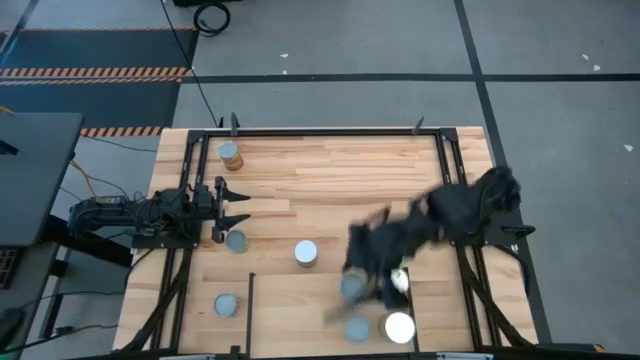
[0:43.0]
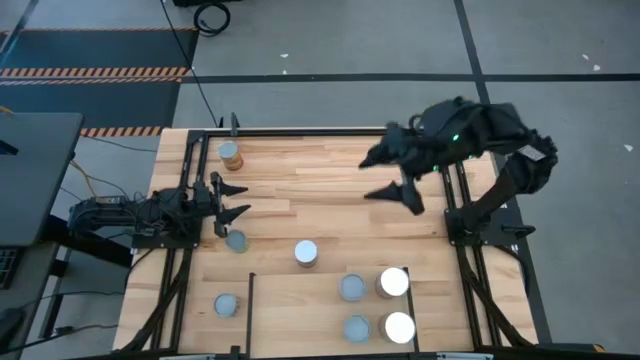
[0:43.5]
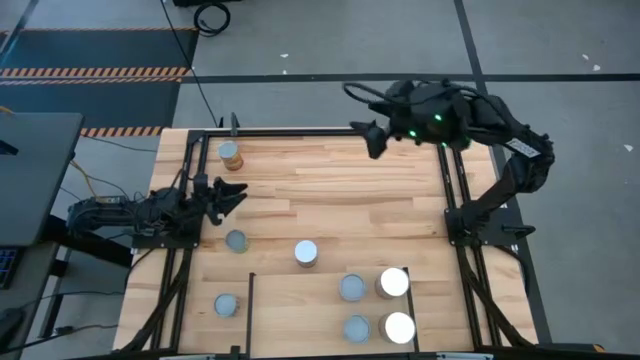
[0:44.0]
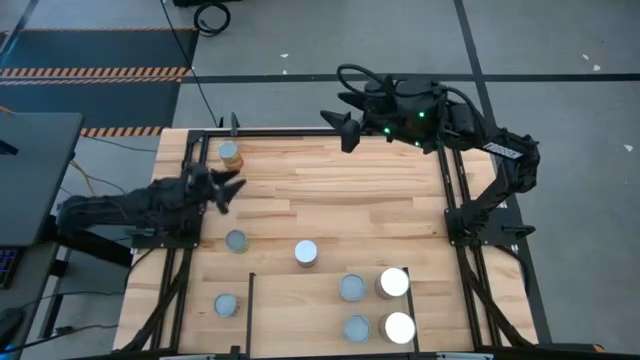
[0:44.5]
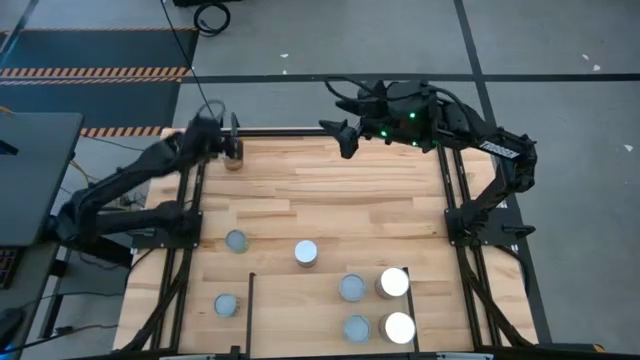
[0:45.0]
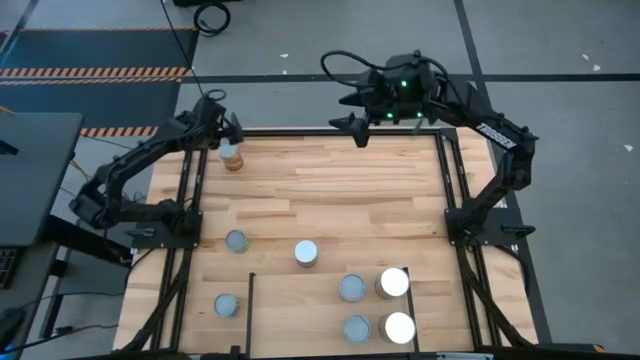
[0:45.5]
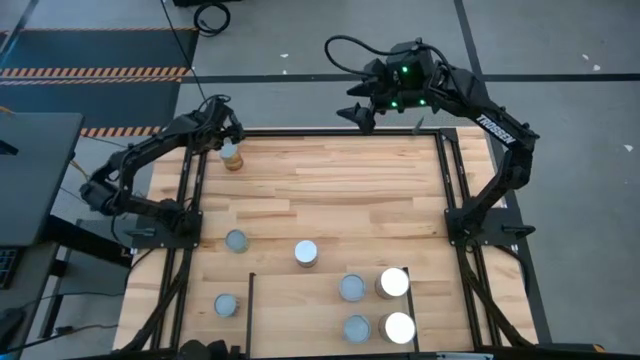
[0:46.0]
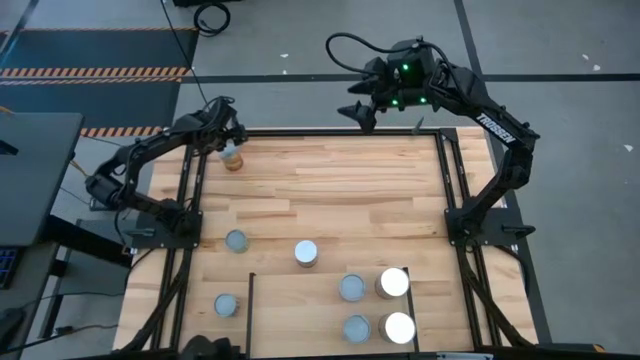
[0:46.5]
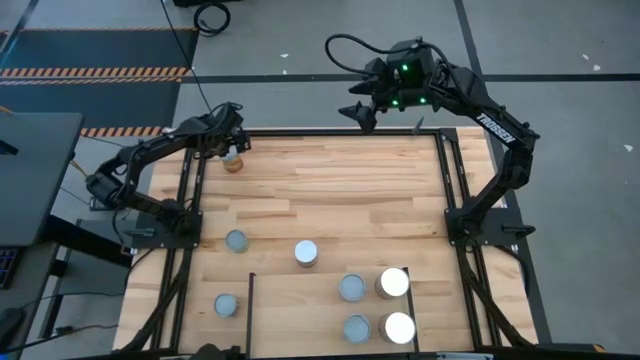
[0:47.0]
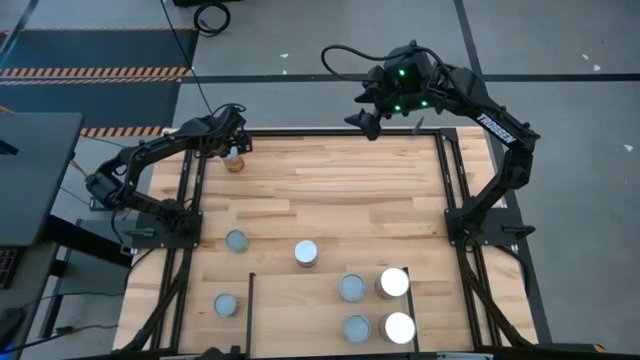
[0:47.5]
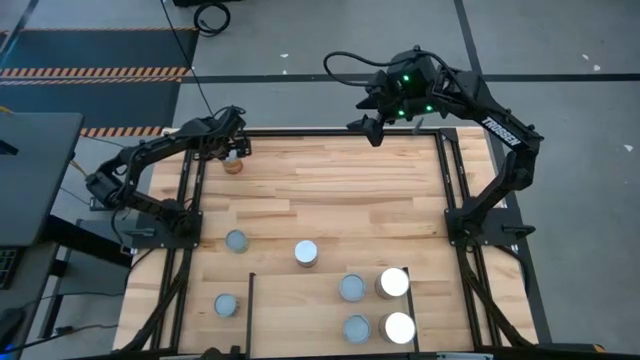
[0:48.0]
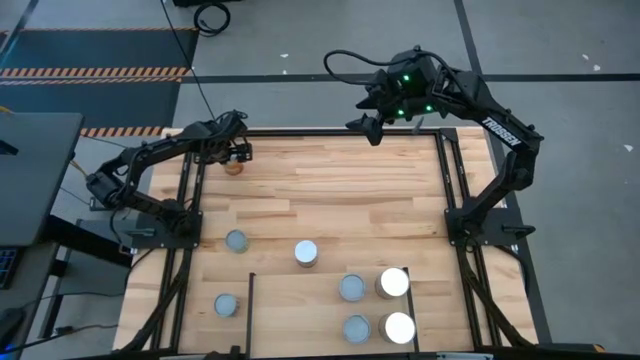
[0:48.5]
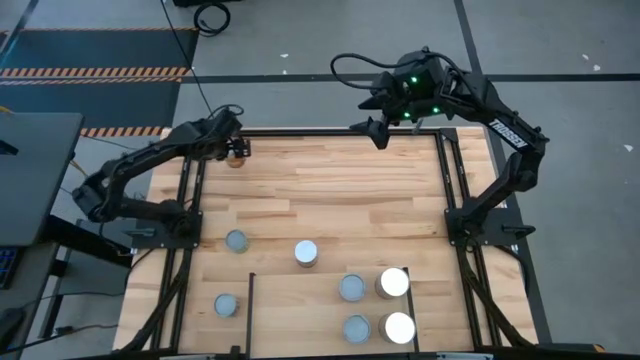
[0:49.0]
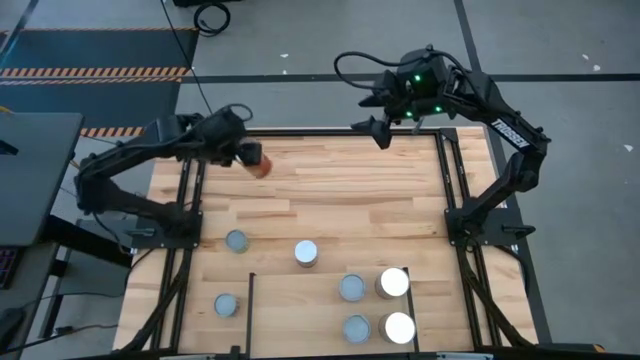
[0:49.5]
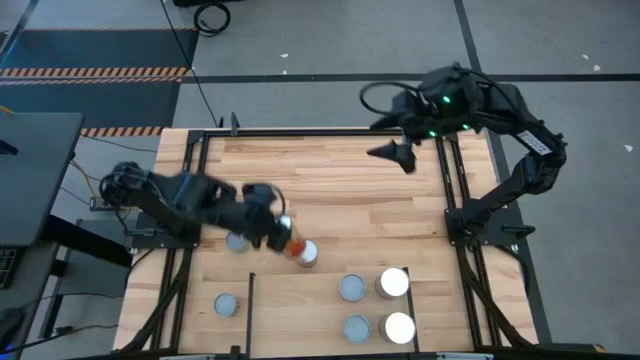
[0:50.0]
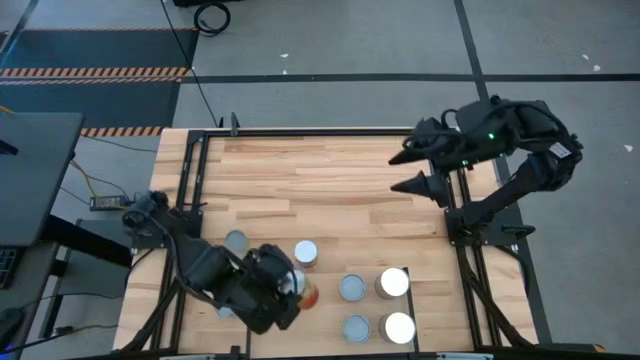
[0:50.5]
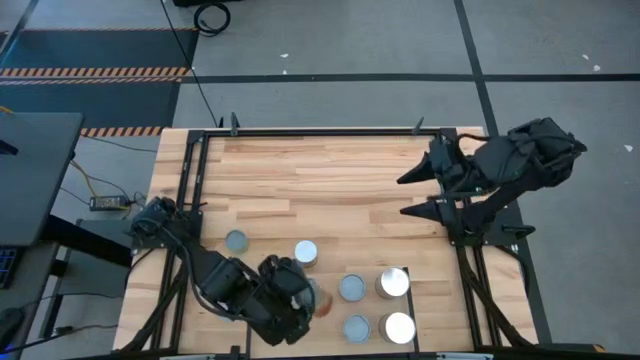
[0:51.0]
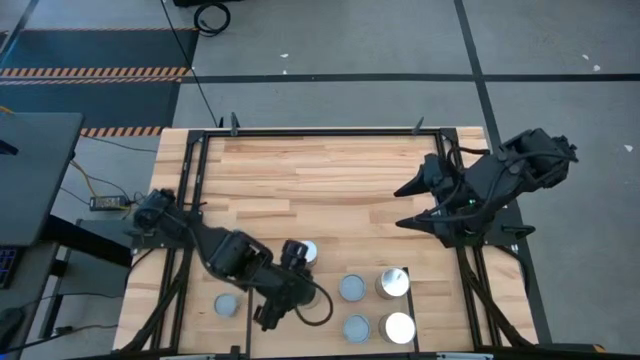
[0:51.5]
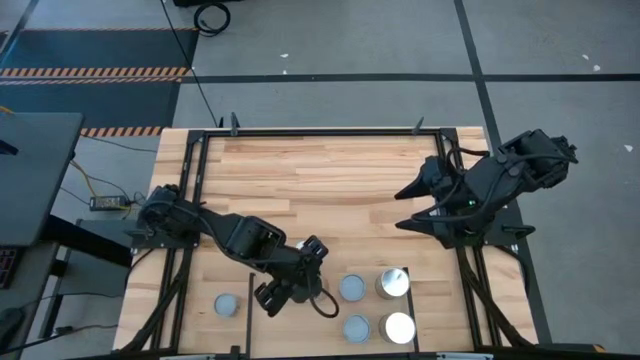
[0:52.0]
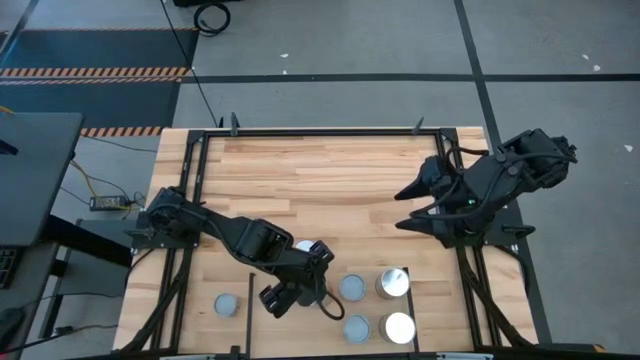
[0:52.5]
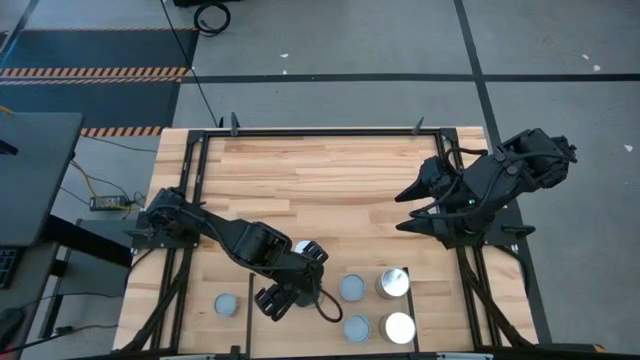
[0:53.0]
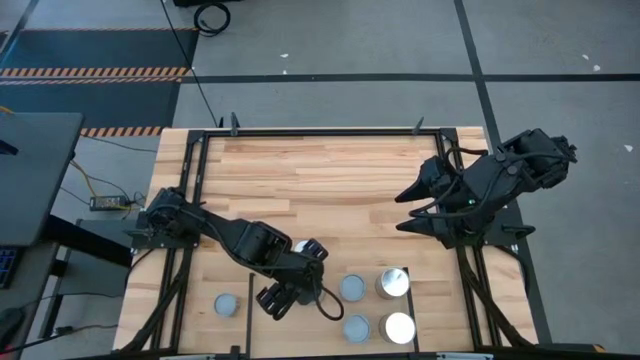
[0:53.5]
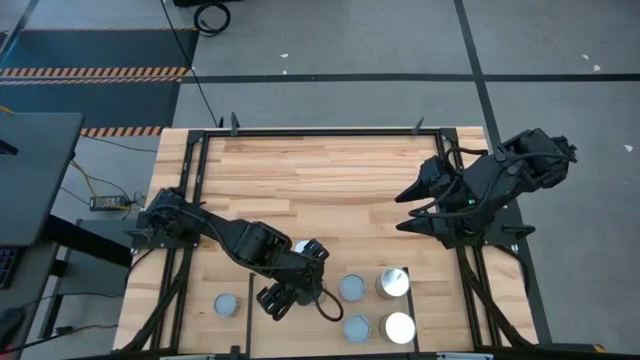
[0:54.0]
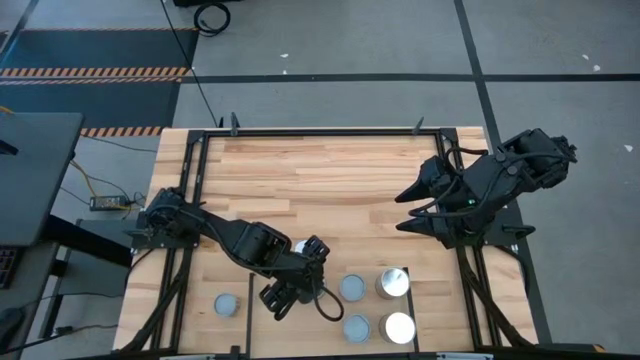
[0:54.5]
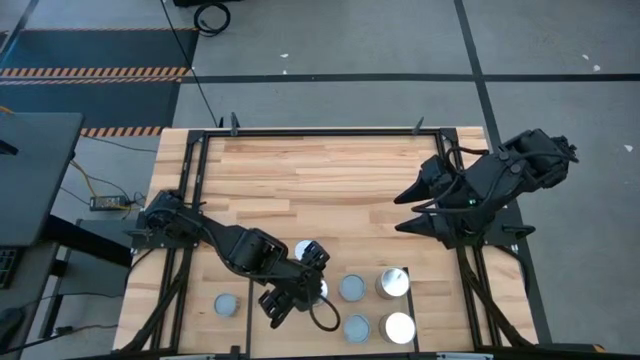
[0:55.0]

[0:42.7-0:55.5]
Task: Pick and place cans onto a shelf
Put the top orange canned corn on the shelf

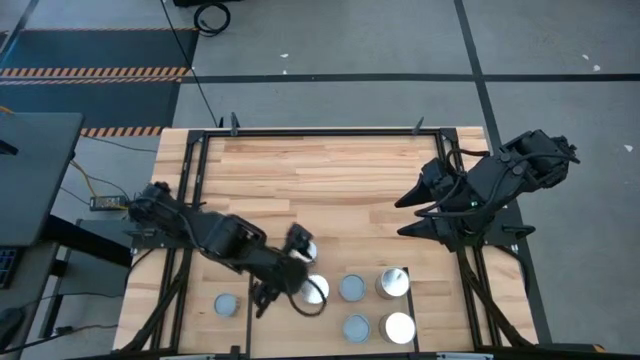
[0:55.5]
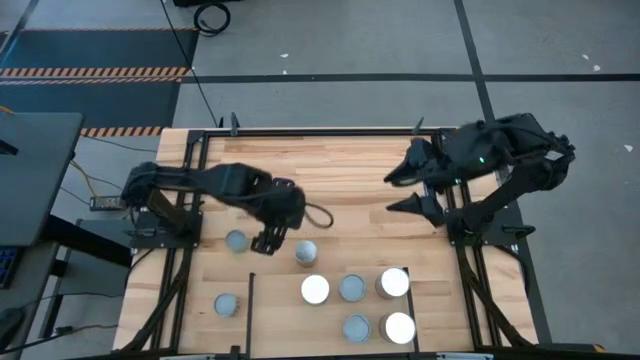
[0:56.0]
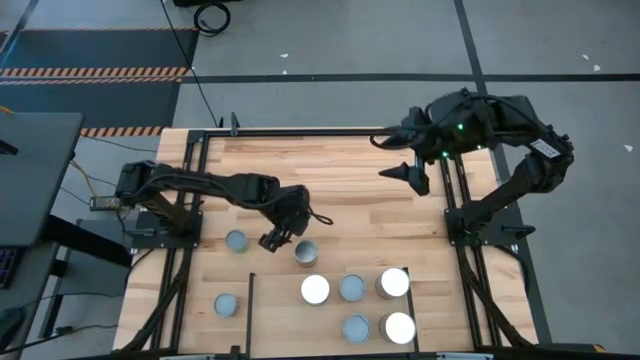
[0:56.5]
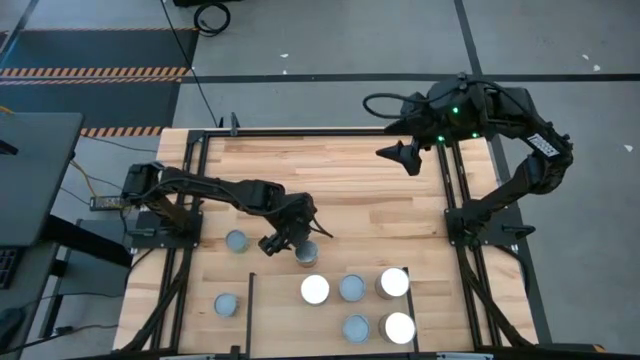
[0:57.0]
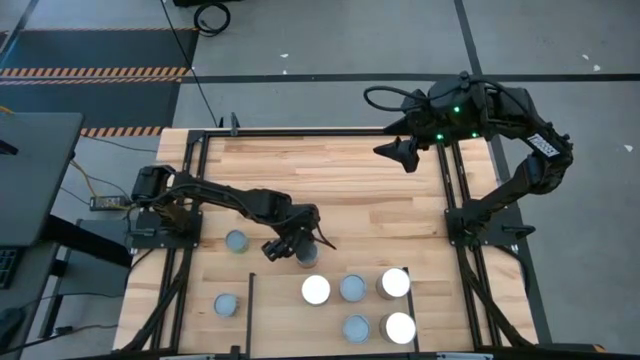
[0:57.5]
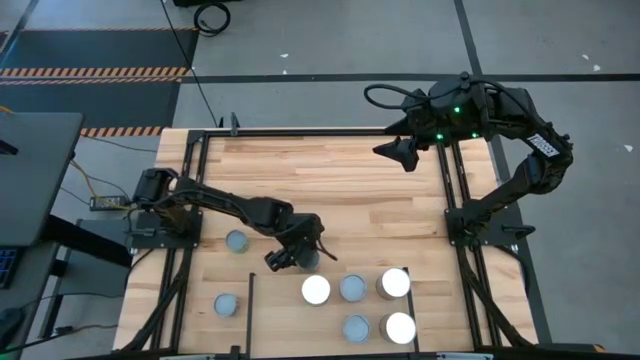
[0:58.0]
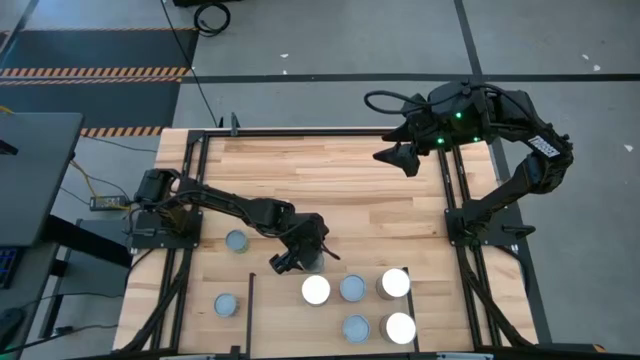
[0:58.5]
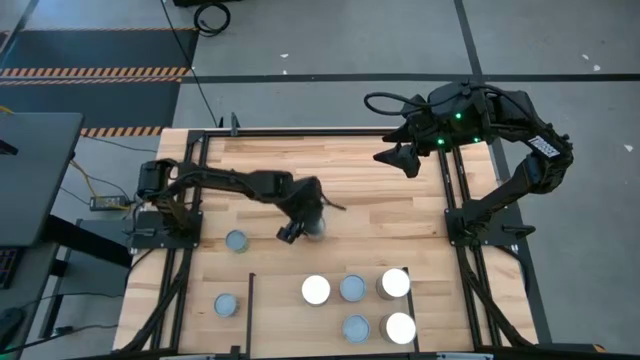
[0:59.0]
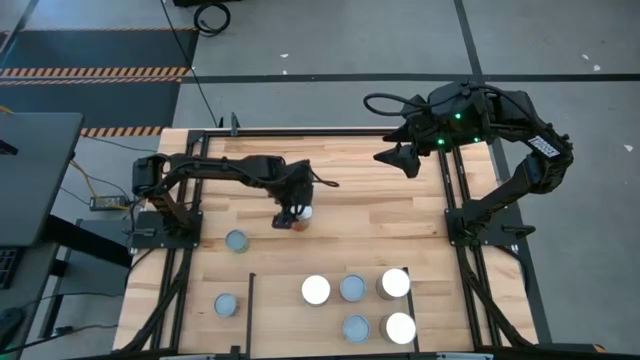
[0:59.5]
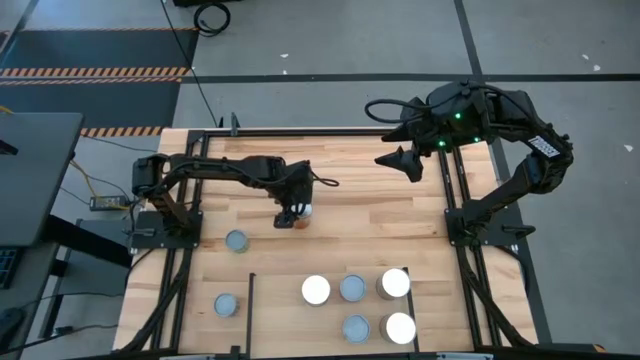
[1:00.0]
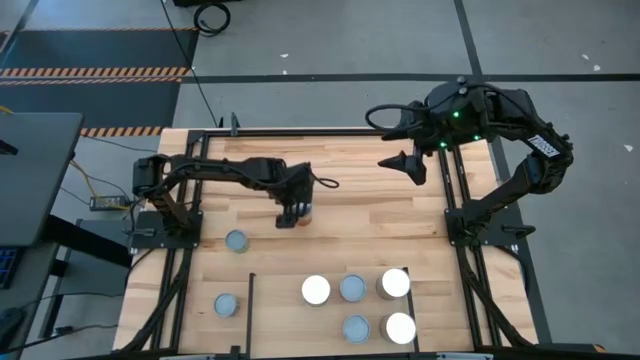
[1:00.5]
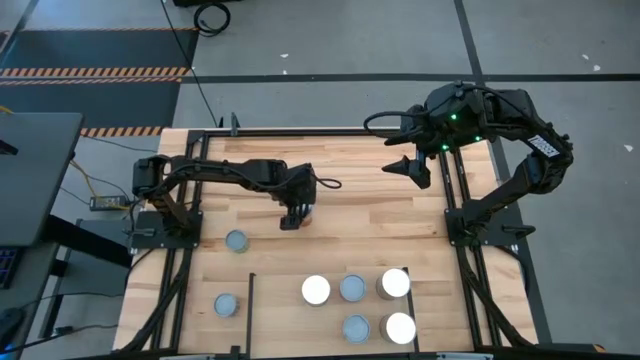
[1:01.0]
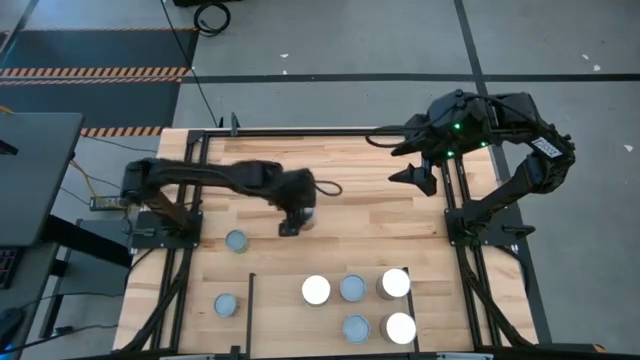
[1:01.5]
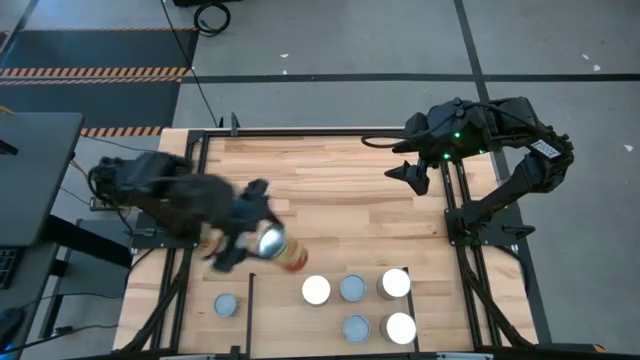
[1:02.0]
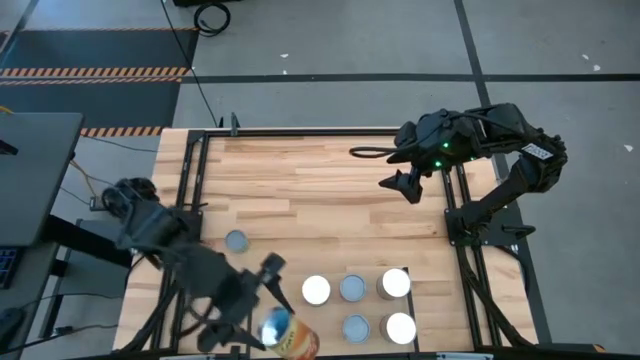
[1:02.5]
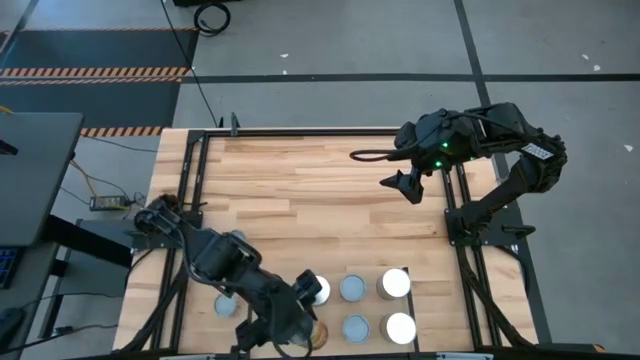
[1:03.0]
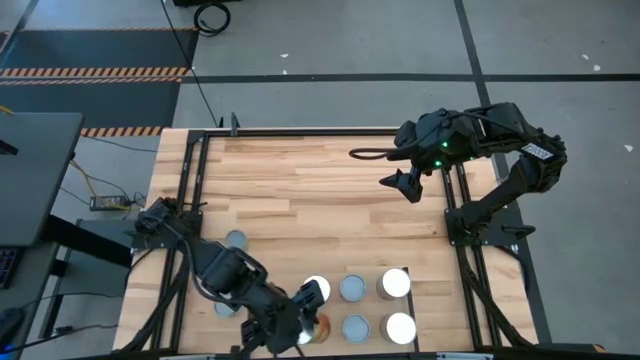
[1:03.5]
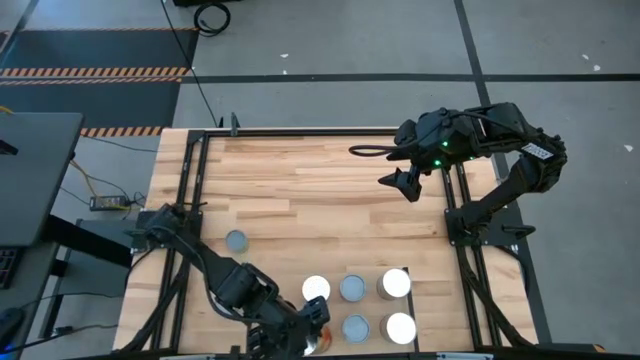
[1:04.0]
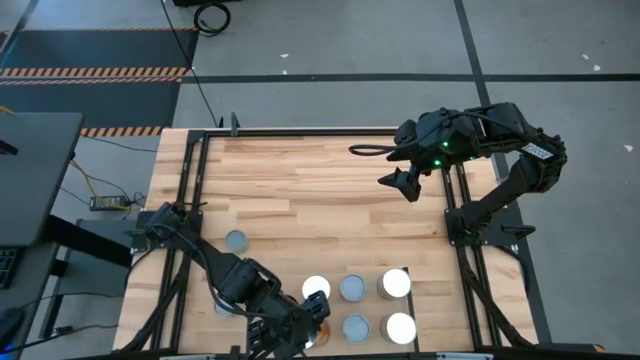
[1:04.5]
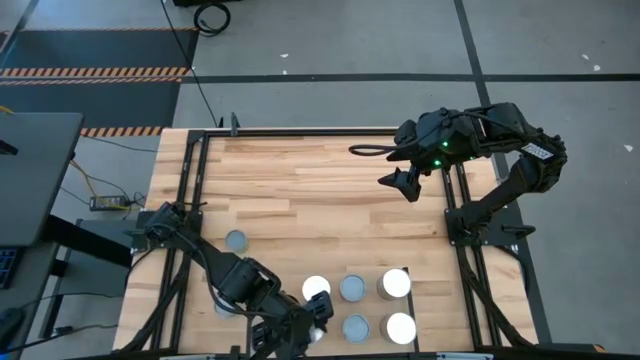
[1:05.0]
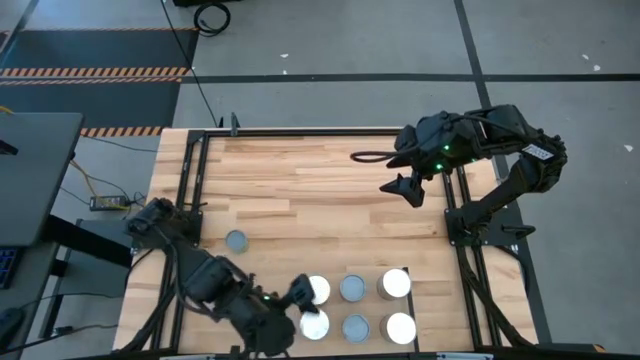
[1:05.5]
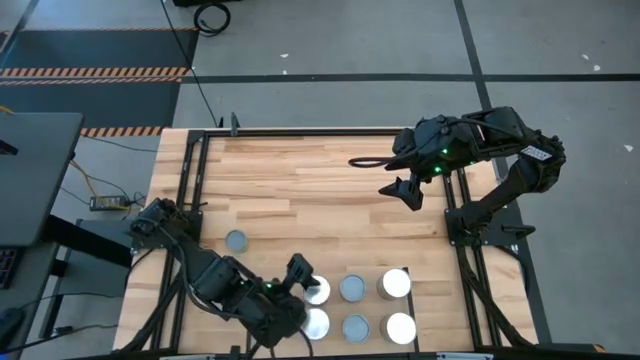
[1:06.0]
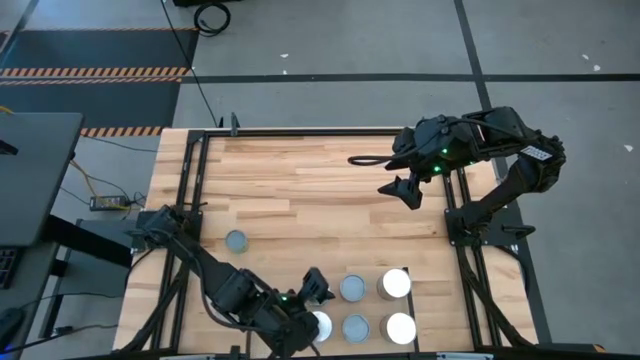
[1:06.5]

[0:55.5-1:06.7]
Put the orange canned corn on the shelf
